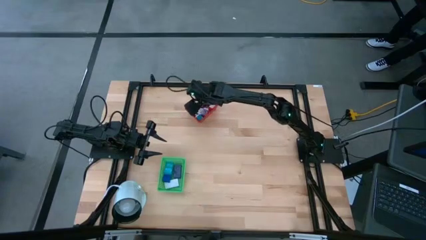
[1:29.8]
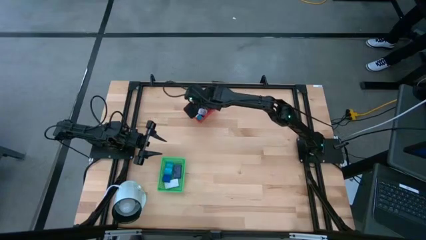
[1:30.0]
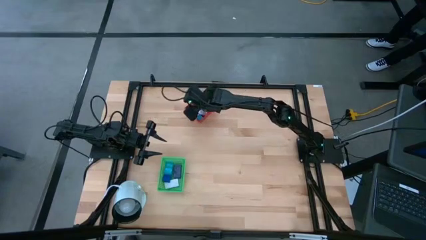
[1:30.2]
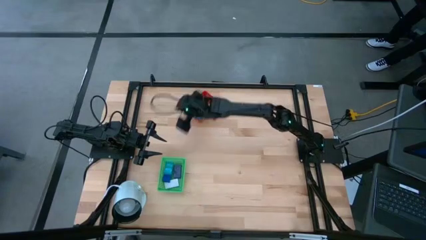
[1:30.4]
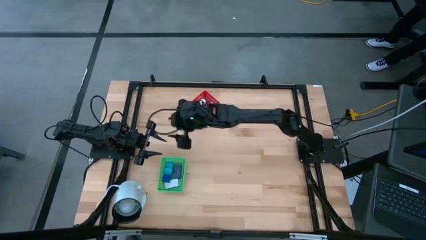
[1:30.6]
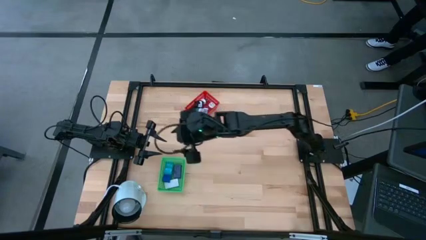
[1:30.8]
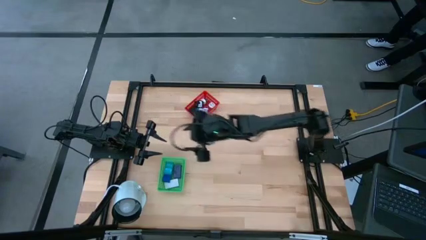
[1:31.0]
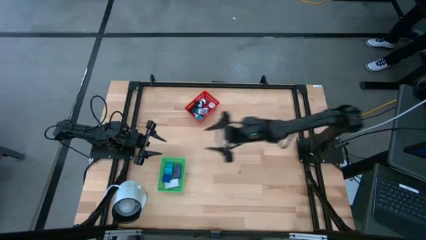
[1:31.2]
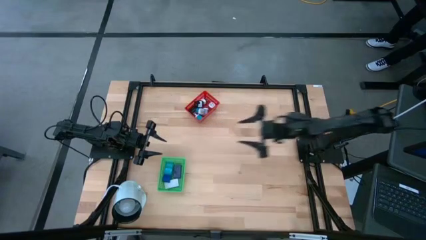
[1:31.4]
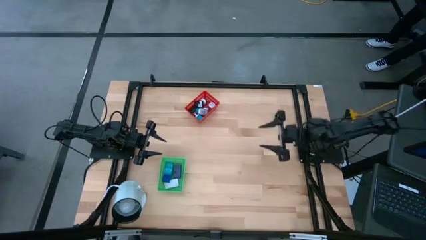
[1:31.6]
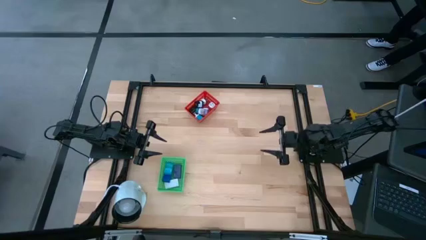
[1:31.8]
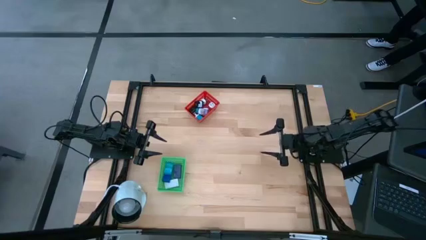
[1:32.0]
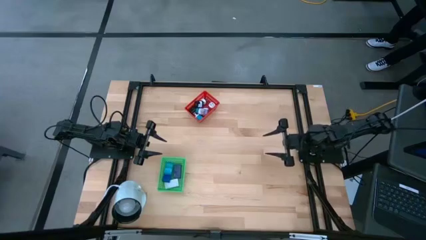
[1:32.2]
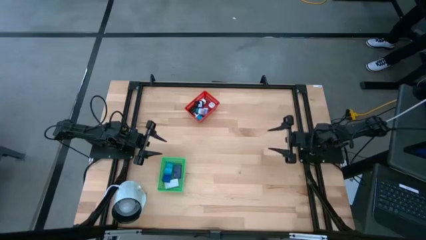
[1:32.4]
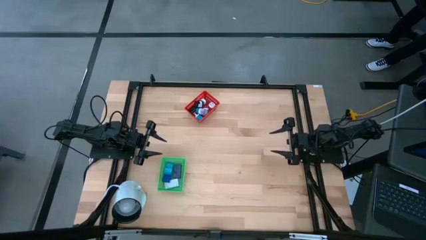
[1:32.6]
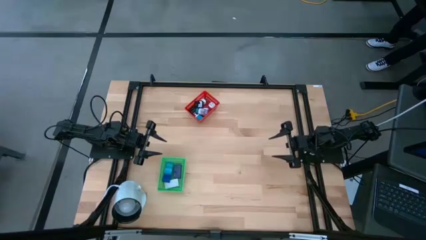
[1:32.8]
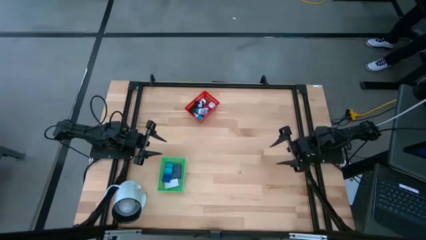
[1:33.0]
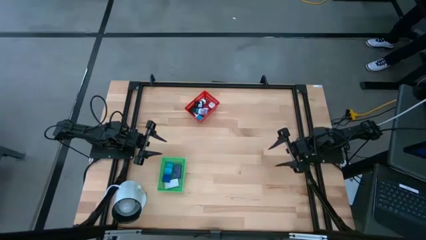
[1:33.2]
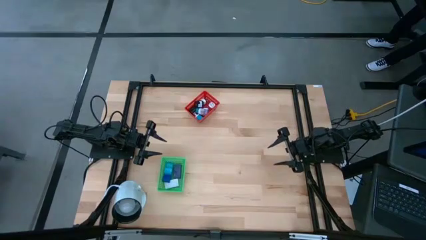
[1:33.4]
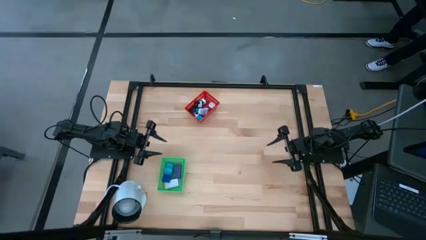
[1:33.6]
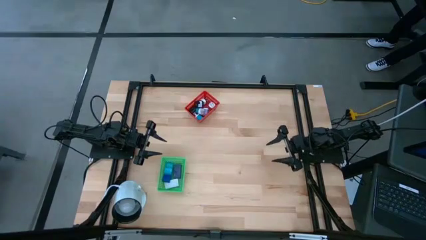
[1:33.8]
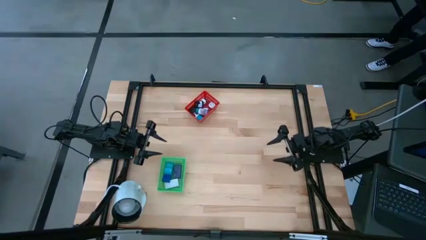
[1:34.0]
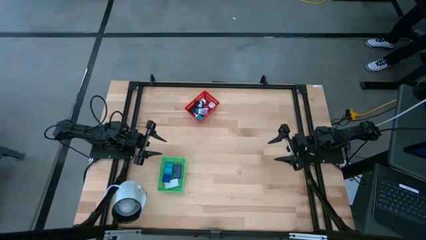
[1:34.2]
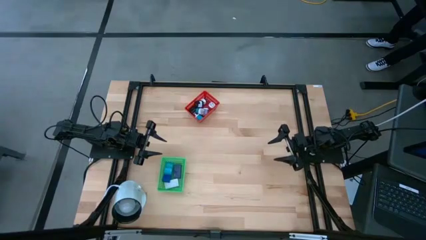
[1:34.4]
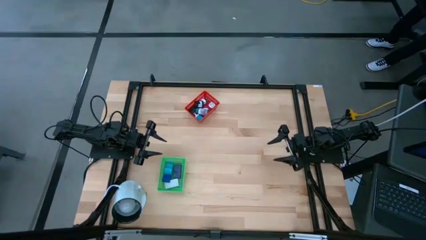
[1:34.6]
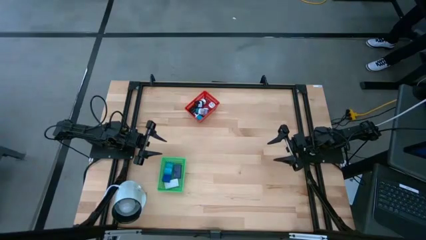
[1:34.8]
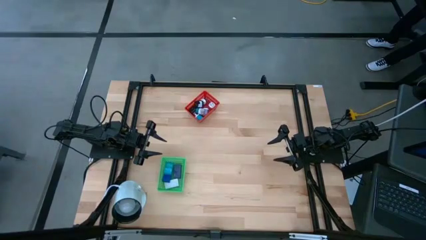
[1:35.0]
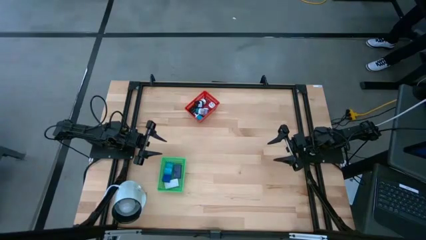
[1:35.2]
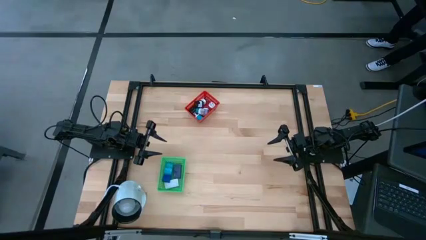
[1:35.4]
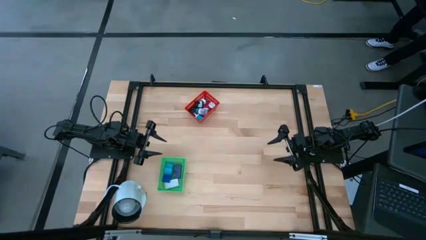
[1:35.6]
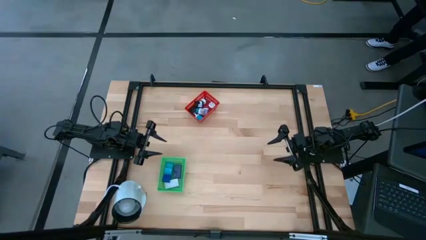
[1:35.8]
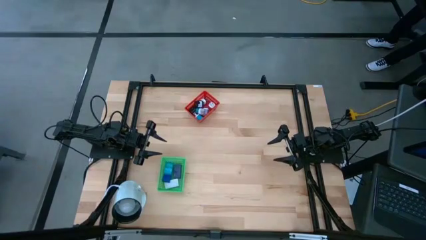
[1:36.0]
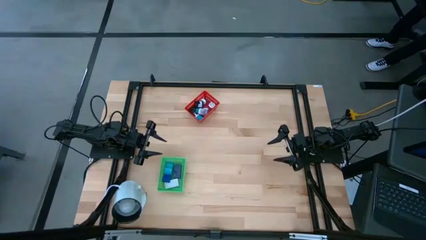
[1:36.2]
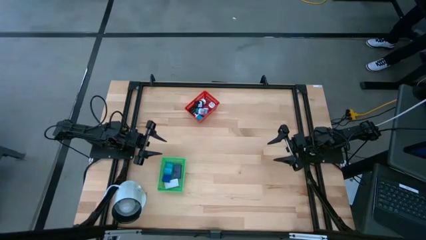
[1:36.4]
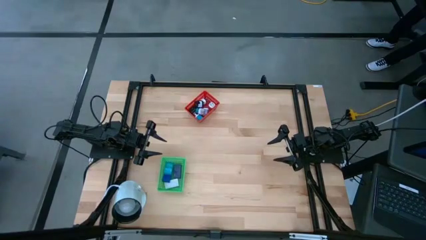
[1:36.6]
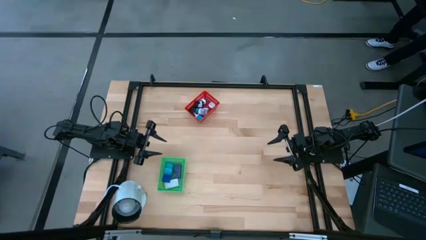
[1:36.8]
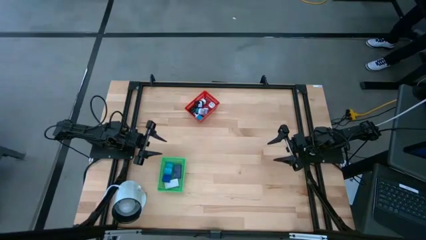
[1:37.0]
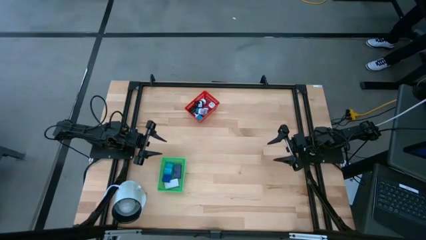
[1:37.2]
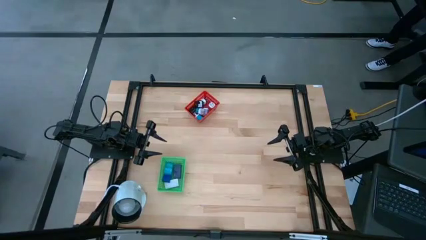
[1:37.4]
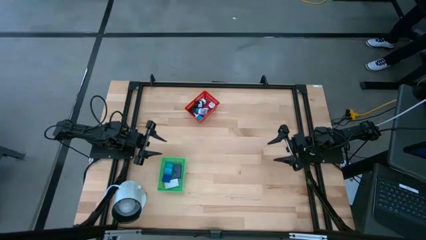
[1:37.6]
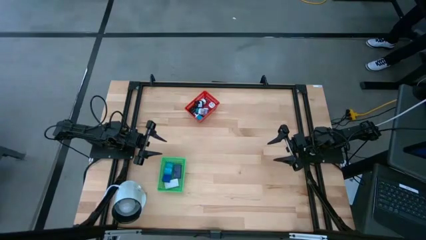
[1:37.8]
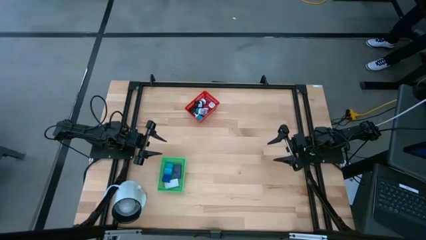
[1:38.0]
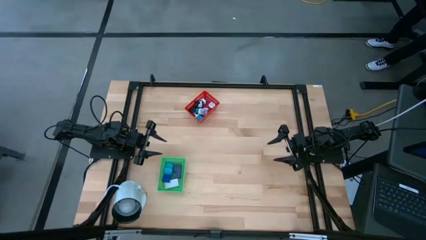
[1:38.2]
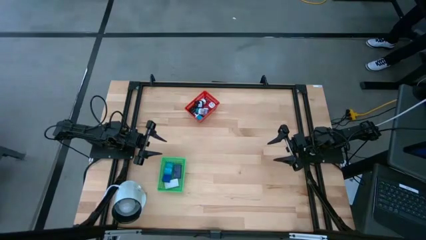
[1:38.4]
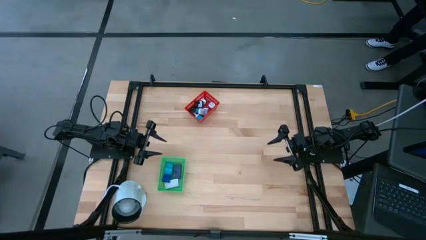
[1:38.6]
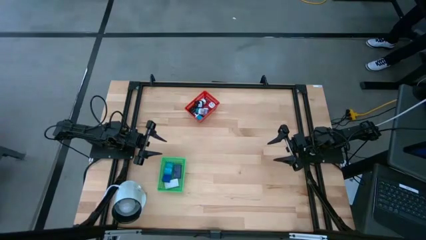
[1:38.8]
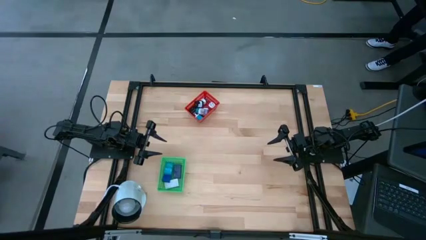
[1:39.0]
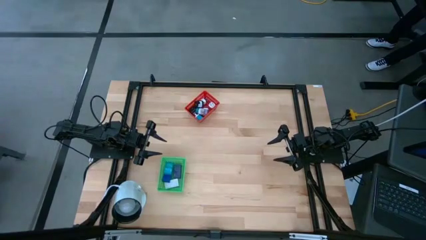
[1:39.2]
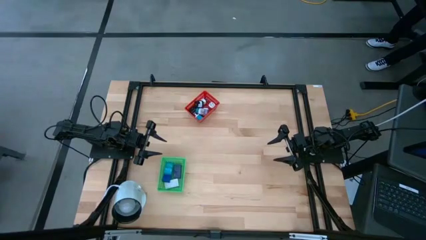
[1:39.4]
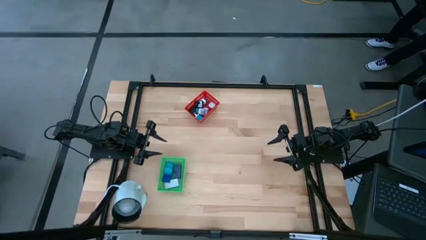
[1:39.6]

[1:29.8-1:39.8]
Task: Pick & Place Office items
Return to Home Position

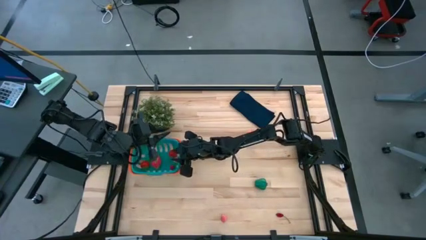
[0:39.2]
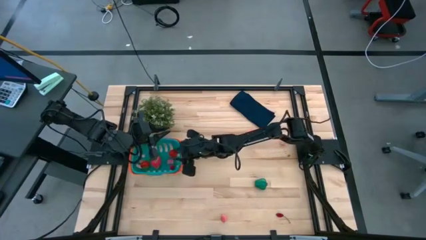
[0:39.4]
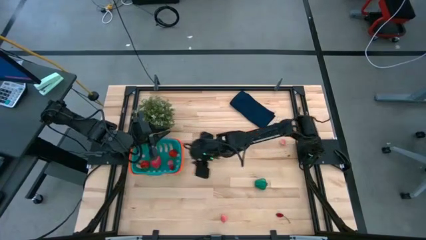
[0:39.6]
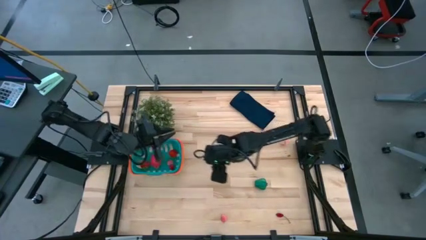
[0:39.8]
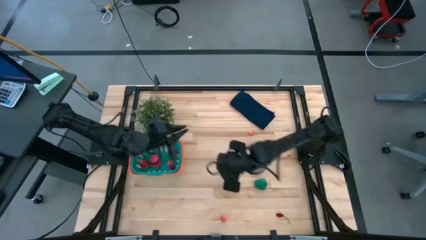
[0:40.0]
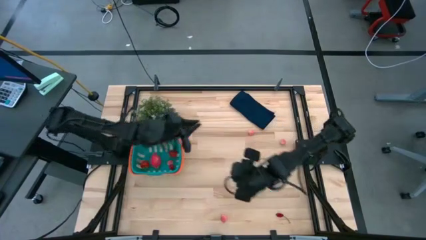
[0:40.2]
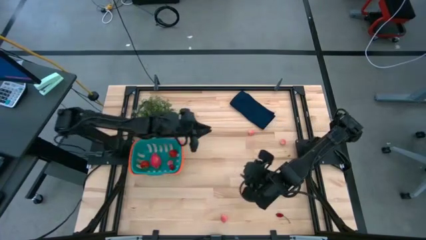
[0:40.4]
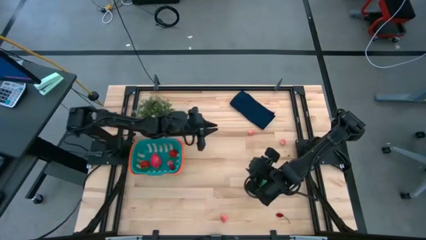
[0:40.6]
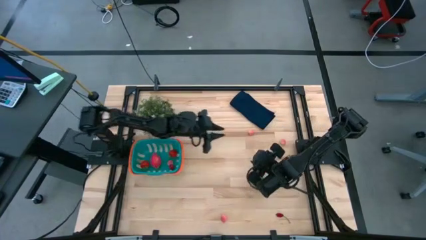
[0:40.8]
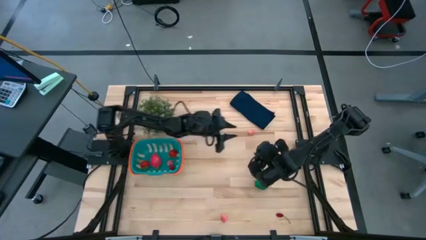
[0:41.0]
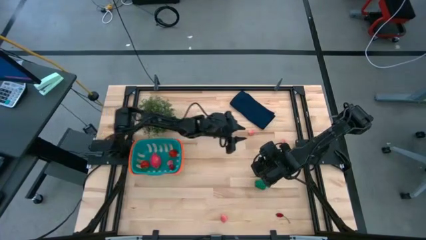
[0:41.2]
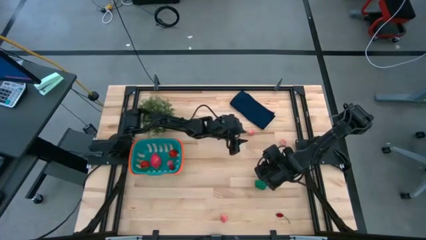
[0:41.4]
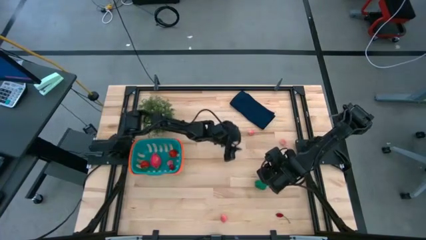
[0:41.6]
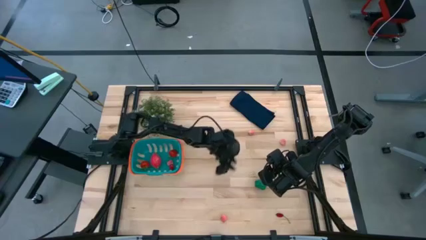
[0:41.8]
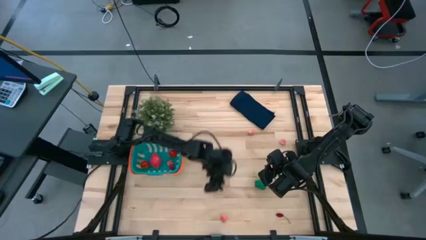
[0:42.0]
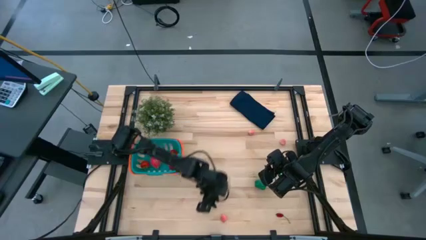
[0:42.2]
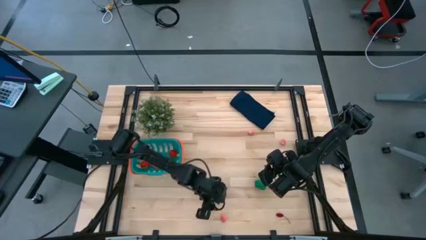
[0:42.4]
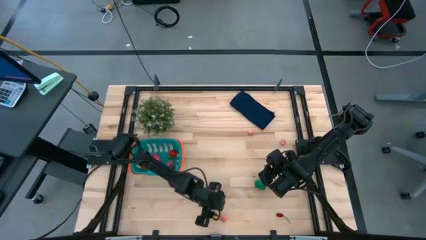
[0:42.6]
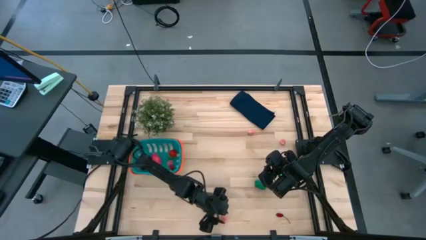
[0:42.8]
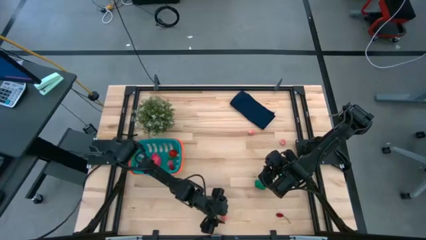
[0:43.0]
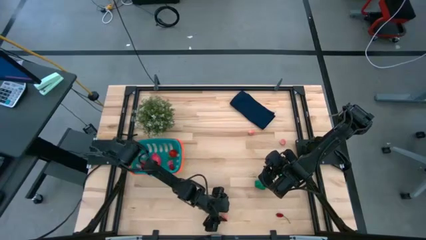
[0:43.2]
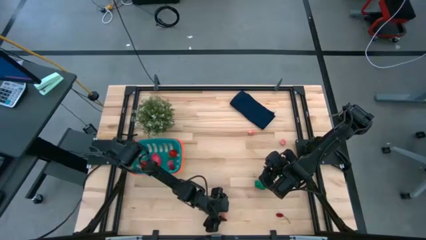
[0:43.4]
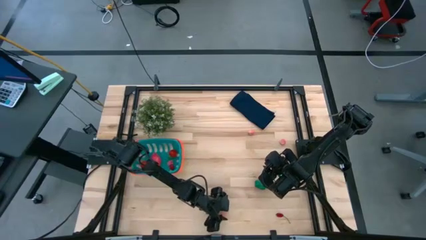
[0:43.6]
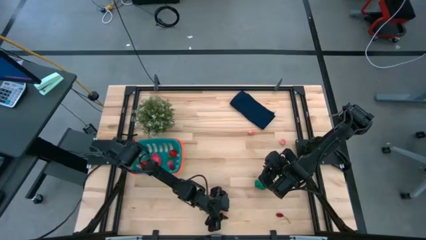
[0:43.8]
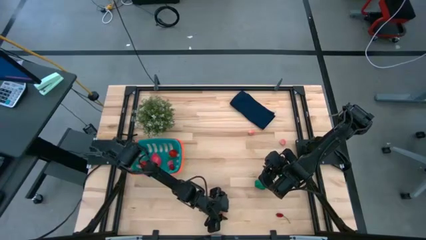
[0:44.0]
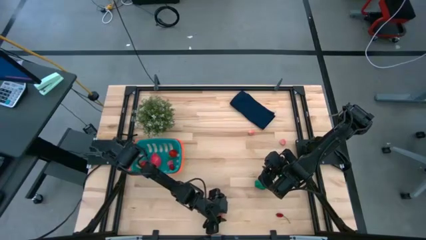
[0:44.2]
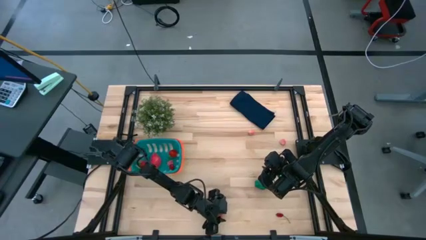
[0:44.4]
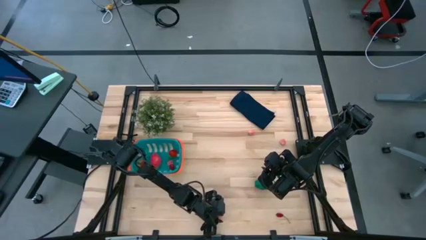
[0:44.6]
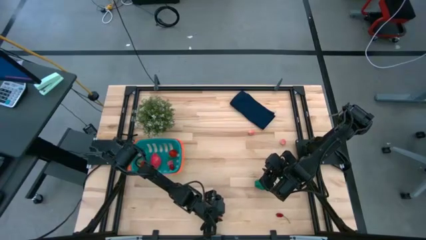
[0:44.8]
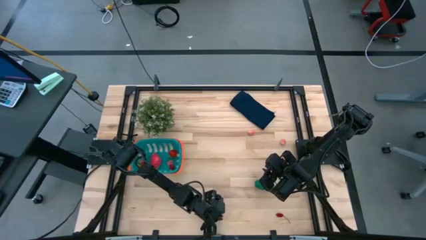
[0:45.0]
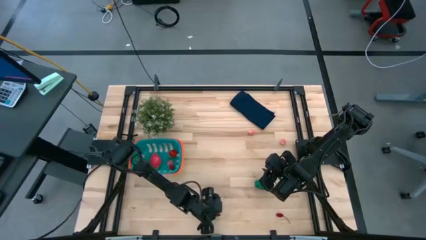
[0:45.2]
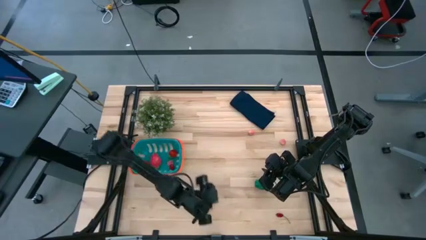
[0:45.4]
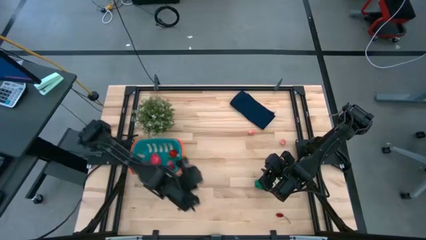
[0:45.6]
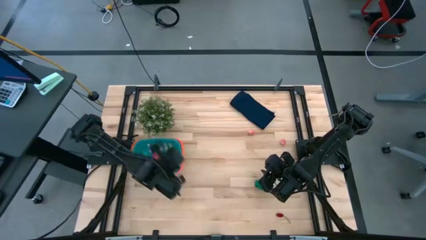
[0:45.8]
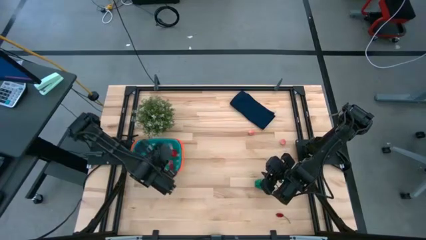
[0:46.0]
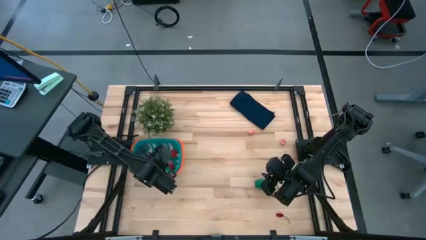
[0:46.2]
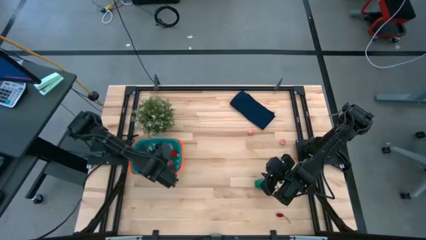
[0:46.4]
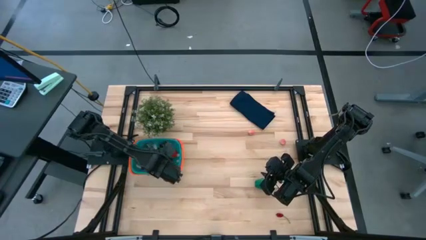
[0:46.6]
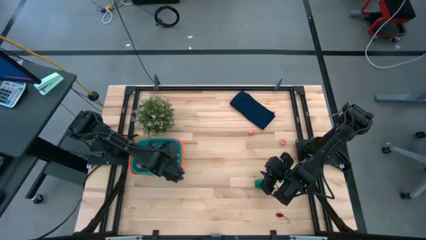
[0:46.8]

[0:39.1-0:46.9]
Task: Pick and placing Produce into tupperware
Put the peach into the green basket
